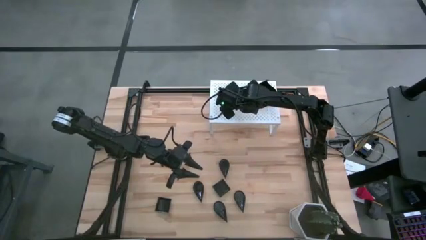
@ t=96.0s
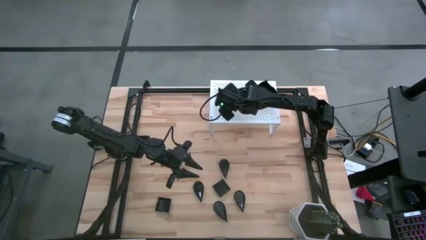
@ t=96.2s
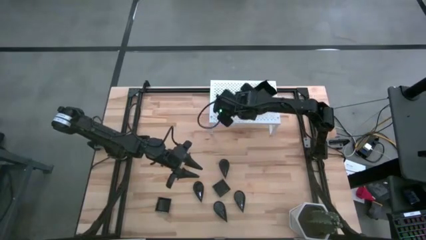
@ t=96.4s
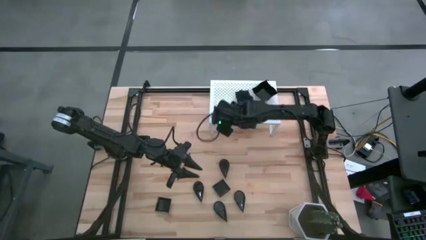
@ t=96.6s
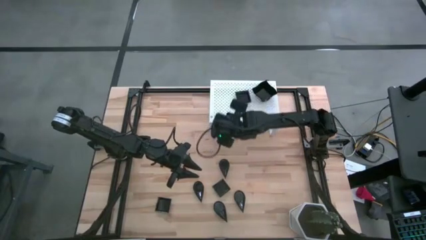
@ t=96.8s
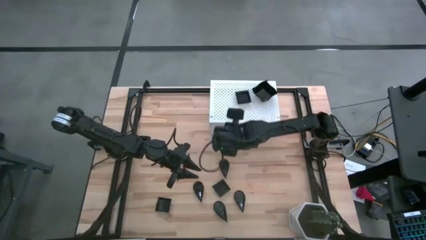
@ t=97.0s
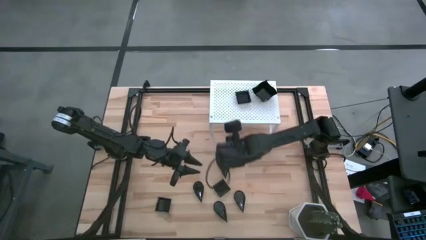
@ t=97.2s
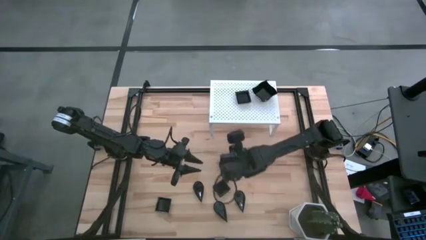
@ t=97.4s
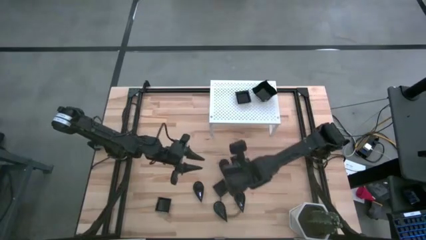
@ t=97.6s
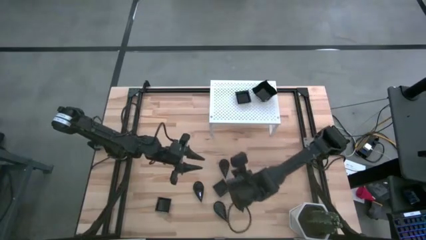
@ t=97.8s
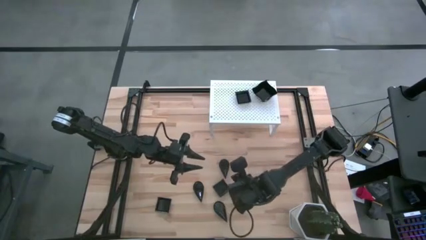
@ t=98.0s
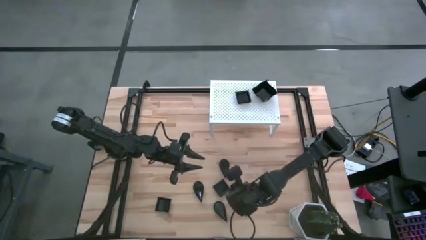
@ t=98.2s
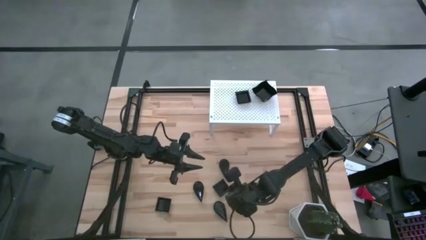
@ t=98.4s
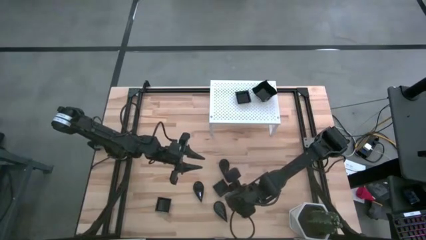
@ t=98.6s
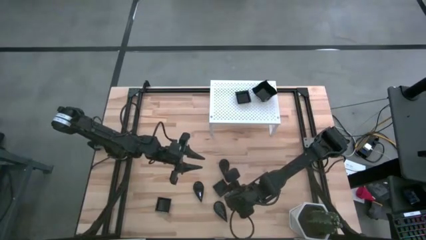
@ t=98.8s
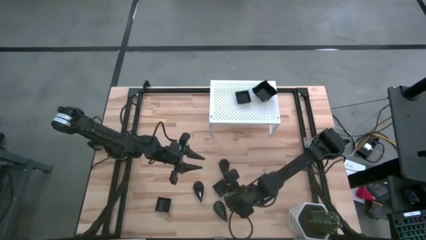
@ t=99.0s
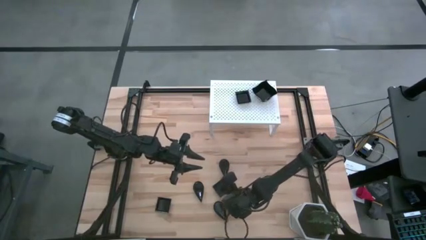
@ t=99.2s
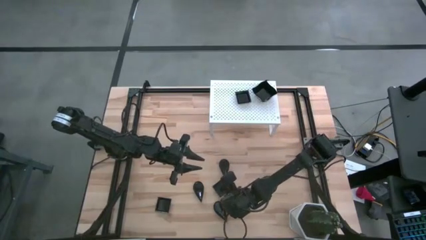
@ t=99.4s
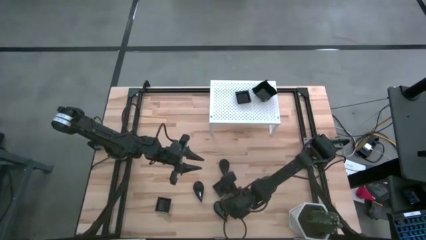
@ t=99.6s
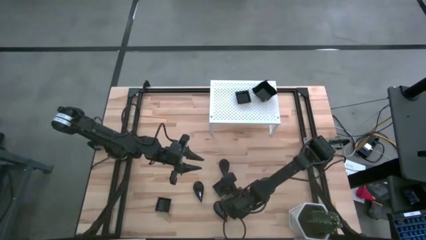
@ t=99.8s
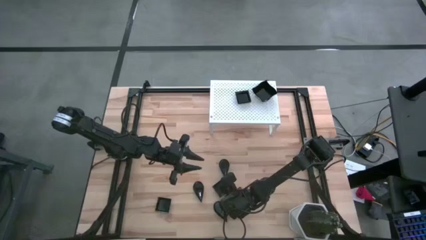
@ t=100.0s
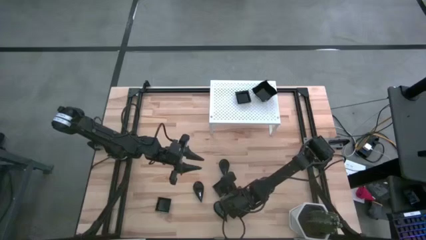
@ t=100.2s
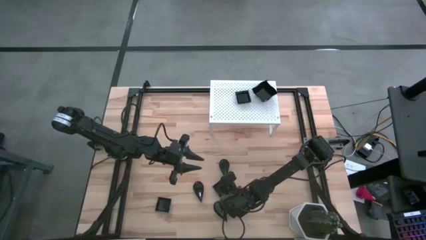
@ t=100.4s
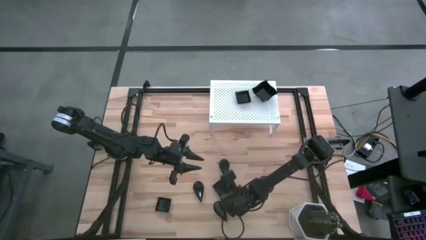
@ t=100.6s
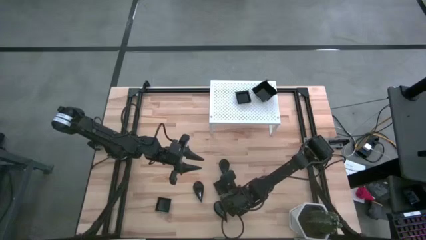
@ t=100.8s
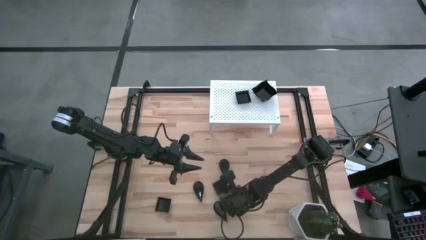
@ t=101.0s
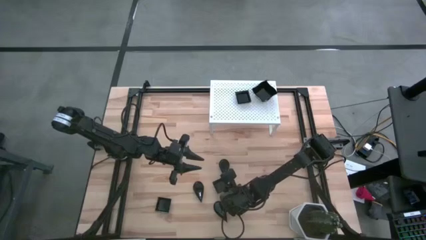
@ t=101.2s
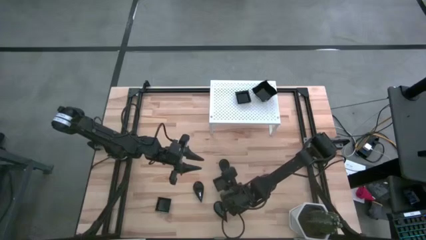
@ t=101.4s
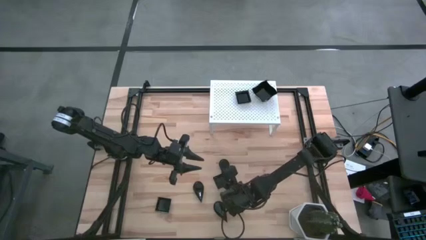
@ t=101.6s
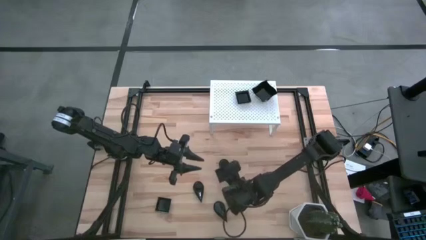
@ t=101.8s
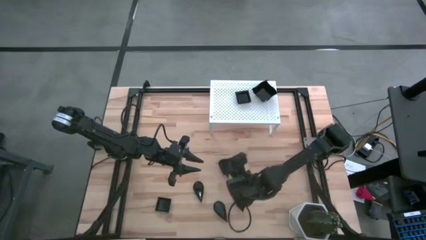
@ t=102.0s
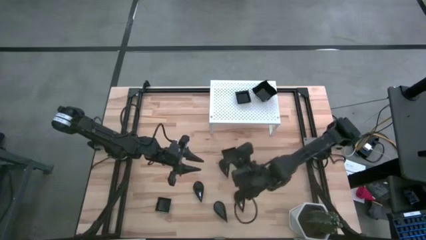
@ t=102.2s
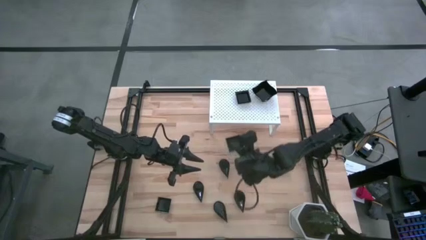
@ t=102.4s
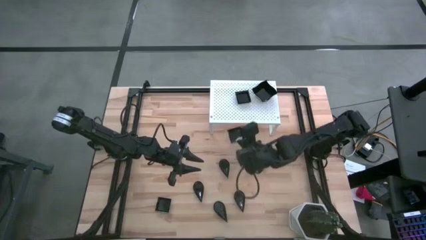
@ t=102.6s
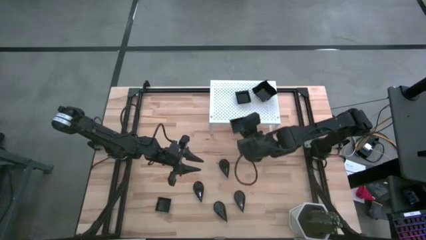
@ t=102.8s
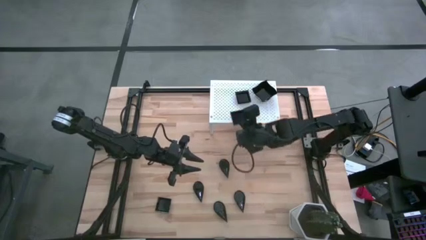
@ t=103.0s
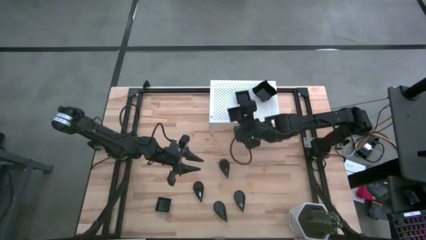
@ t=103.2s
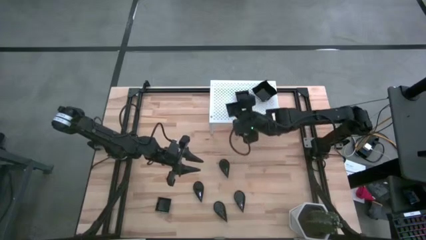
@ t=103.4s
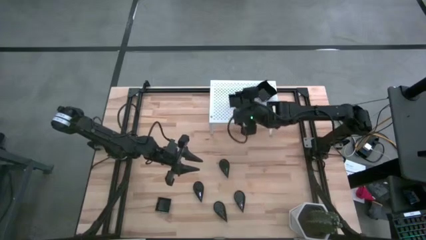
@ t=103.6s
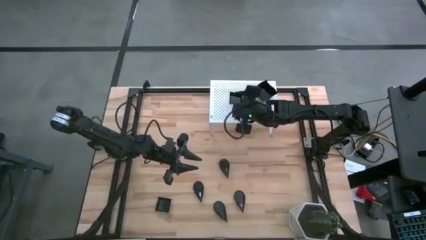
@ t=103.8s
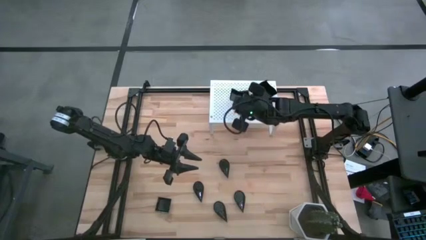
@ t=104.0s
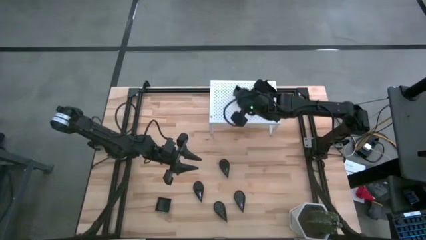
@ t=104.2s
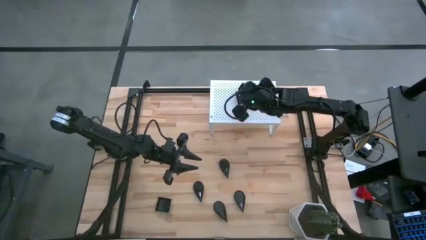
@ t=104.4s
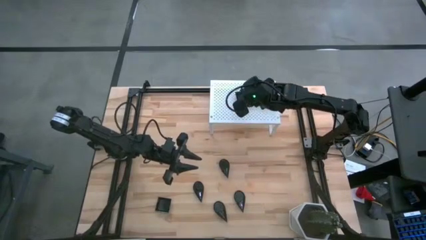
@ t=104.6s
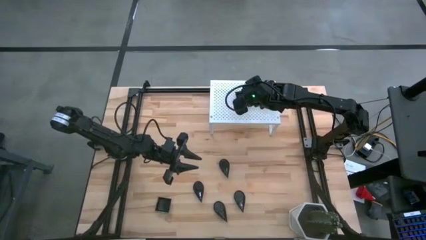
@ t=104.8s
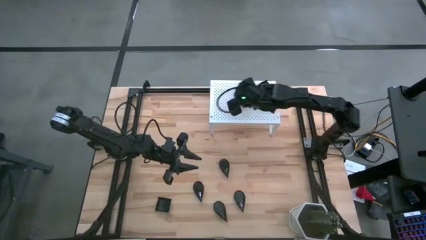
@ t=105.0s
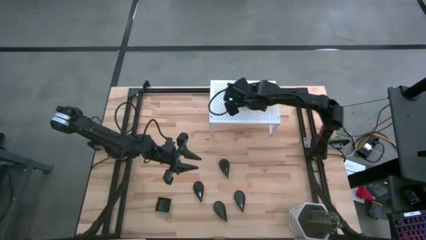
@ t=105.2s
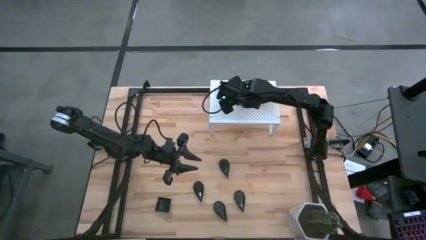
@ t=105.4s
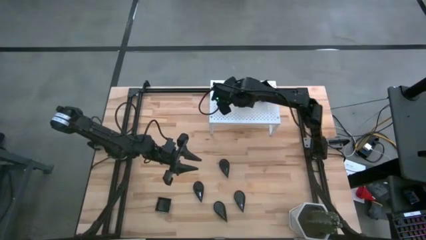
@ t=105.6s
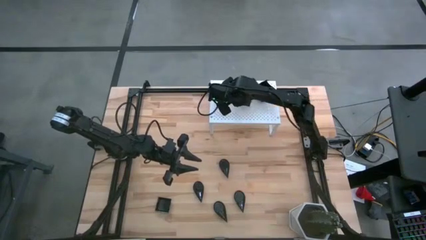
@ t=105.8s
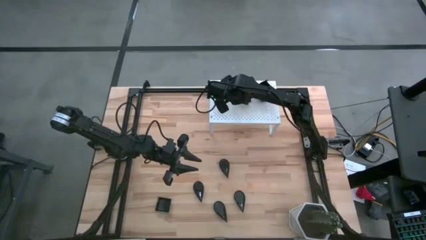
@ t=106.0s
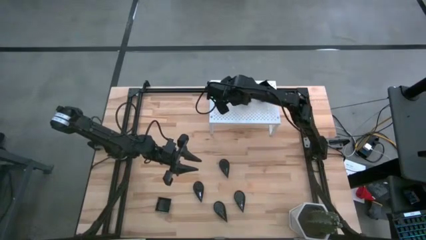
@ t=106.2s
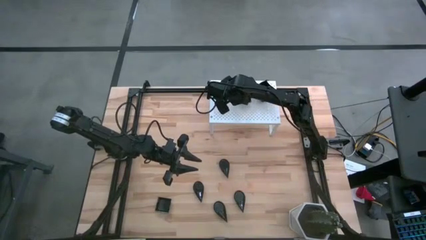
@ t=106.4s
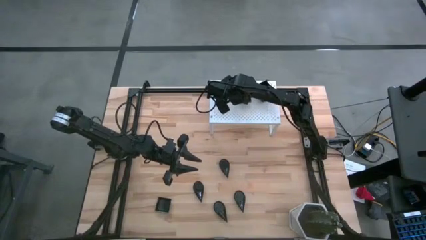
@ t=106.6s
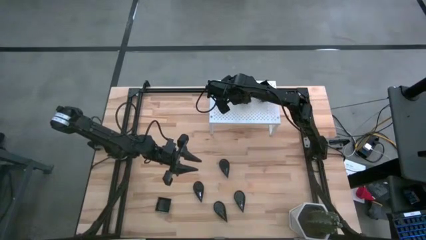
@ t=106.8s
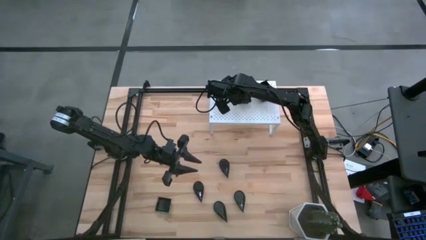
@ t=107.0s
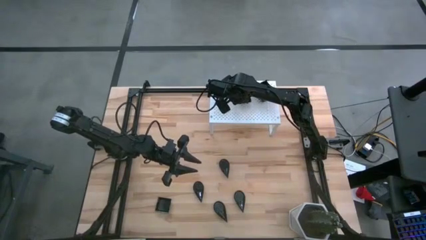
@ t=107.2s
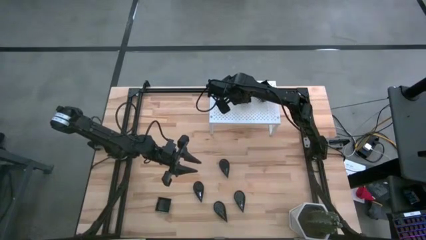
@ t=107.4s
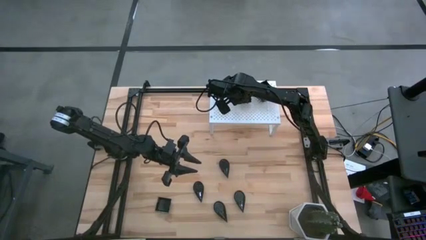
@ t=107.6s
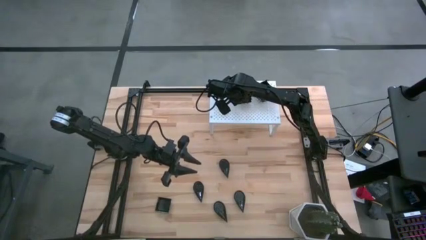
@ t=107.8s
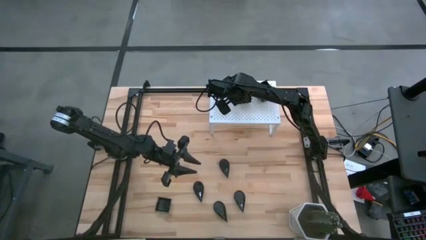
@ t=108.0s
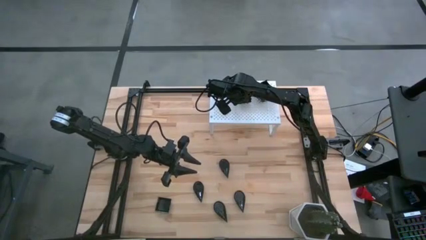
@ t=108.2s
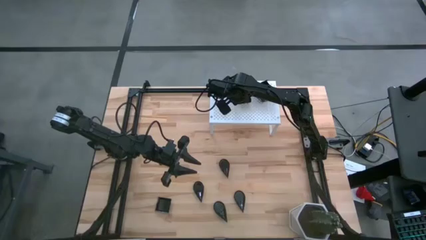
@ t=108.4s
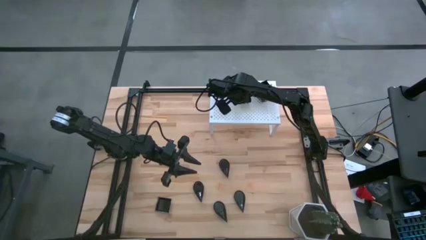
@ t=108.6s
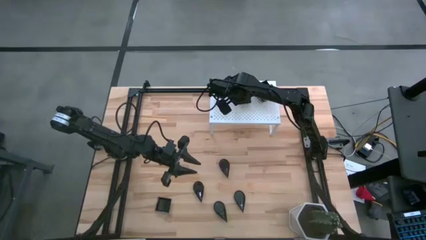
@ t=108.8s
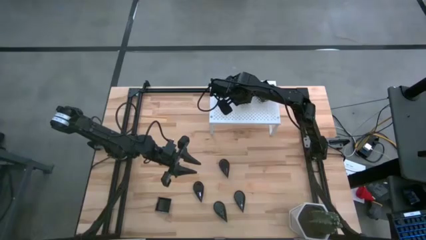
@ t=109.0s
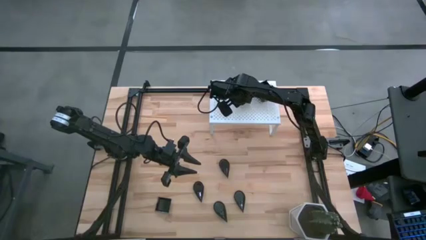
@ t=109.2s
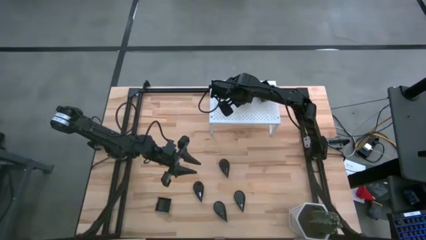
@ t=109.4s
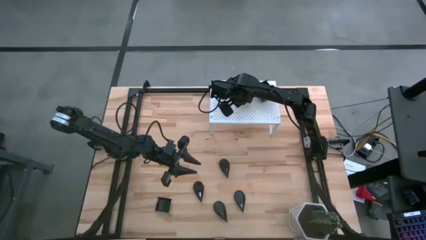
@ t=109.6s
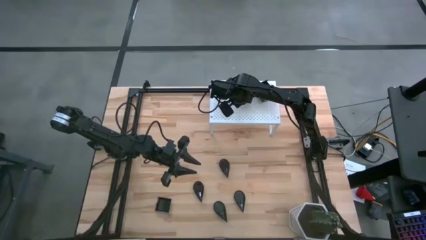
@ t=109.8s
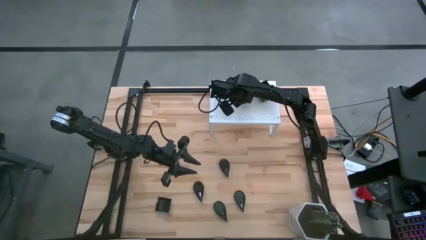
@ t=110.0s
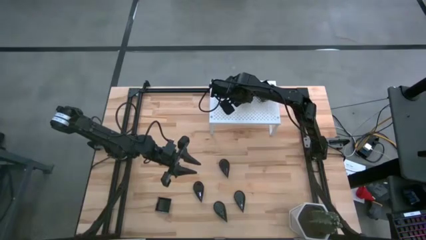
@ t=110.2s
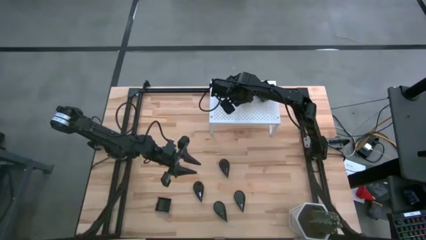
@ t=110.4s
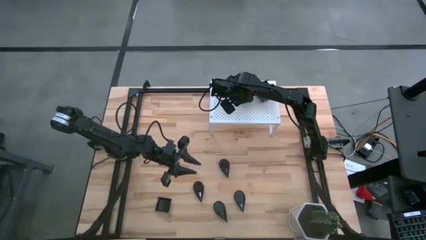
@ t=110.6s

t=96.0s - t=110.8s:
Task: Pick & Place Mini shaped plates
Stack the square plate on top of the square plate on the shelf
